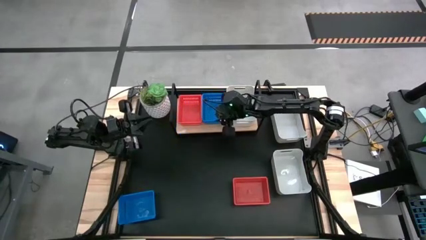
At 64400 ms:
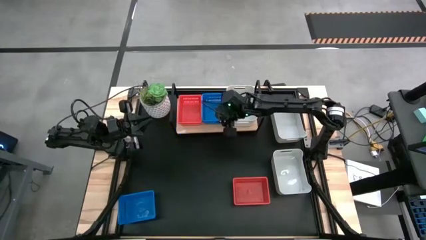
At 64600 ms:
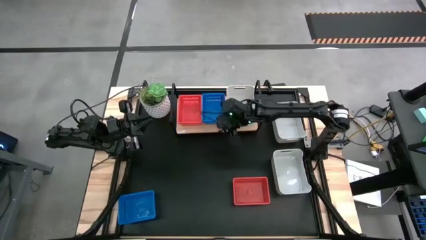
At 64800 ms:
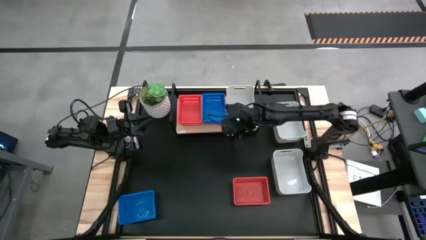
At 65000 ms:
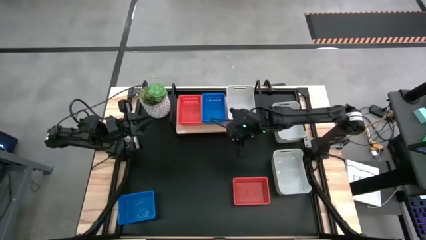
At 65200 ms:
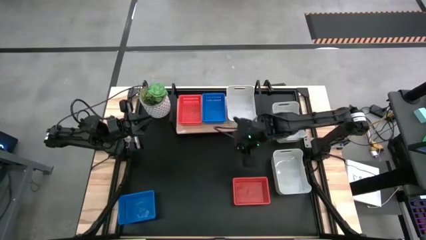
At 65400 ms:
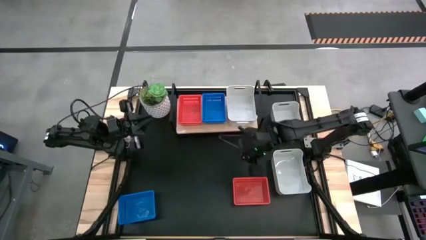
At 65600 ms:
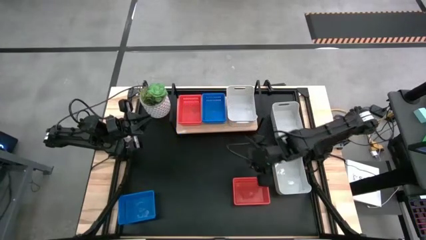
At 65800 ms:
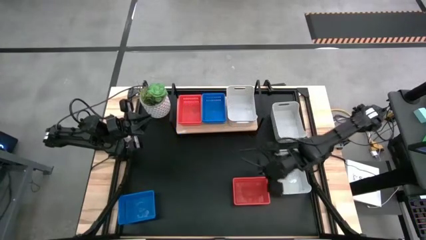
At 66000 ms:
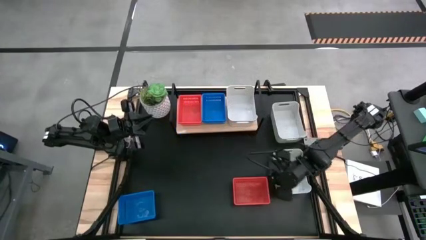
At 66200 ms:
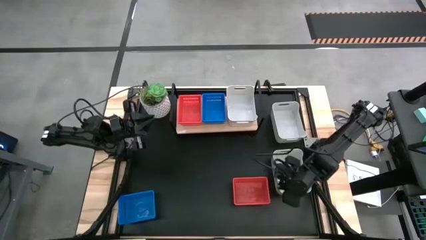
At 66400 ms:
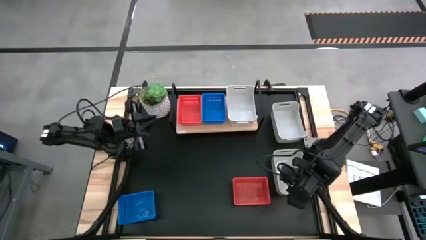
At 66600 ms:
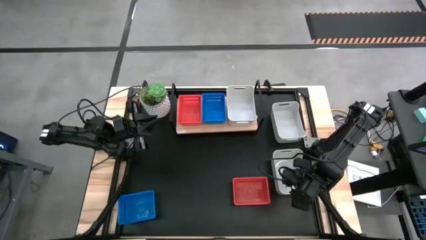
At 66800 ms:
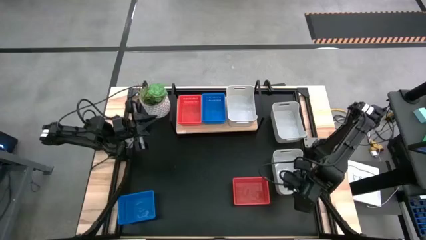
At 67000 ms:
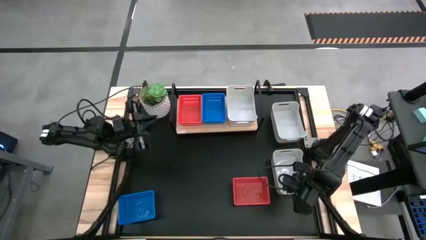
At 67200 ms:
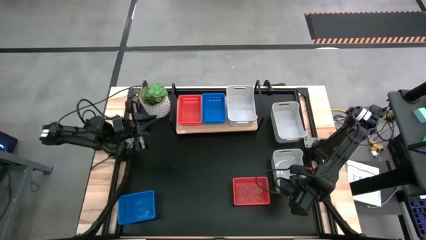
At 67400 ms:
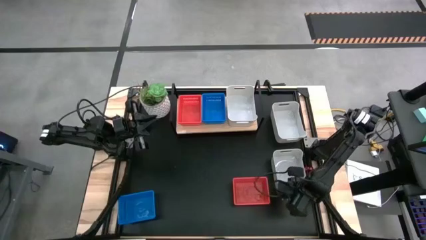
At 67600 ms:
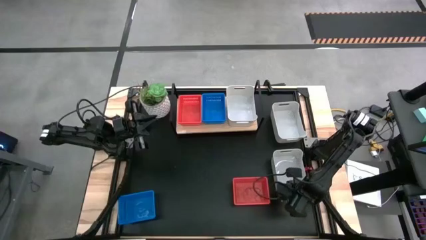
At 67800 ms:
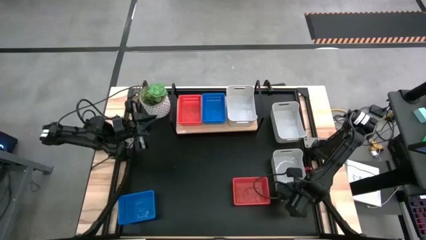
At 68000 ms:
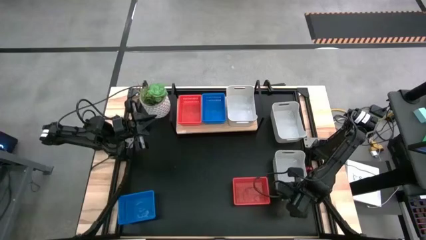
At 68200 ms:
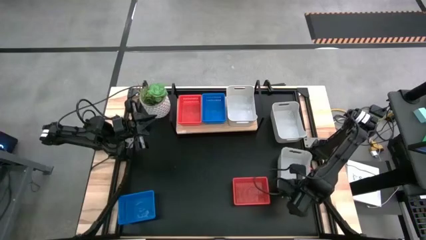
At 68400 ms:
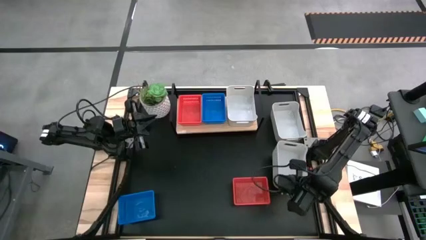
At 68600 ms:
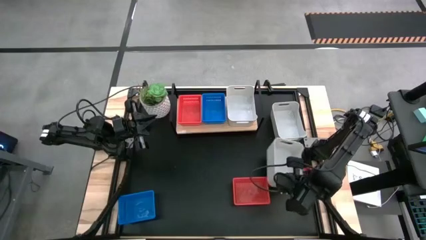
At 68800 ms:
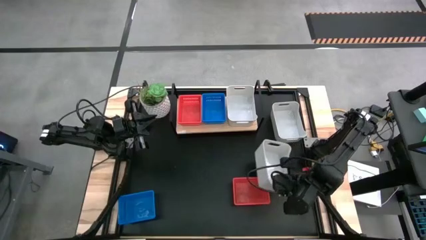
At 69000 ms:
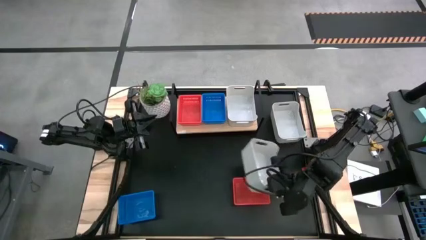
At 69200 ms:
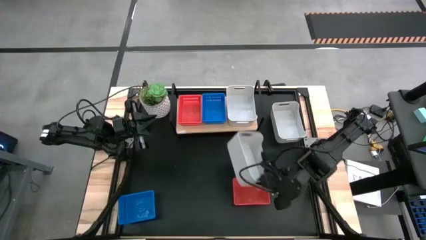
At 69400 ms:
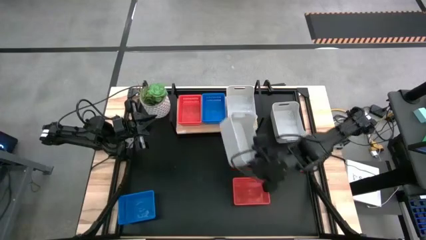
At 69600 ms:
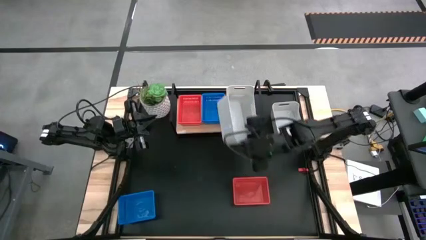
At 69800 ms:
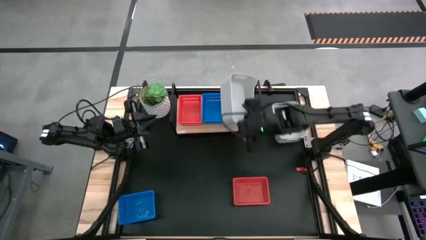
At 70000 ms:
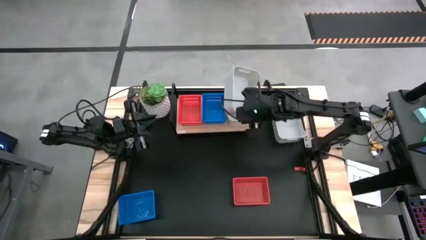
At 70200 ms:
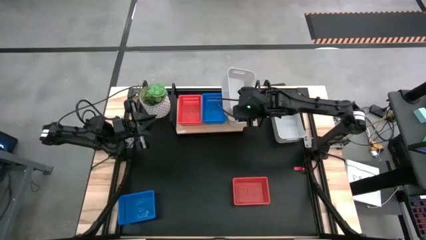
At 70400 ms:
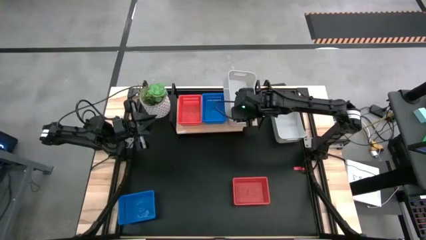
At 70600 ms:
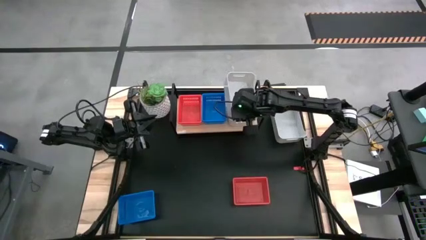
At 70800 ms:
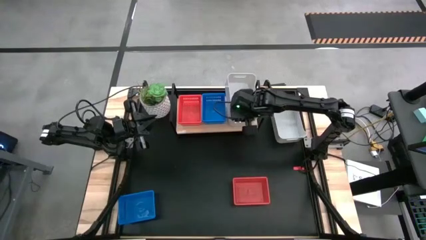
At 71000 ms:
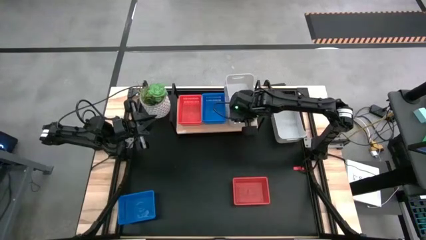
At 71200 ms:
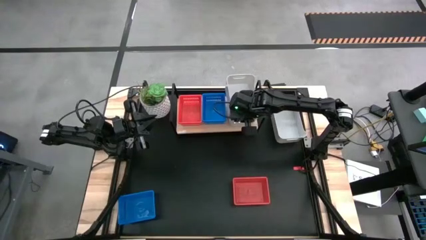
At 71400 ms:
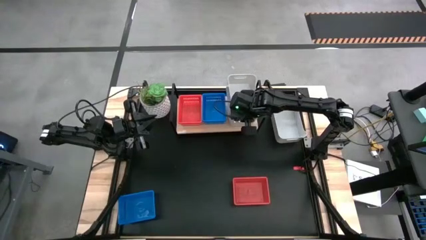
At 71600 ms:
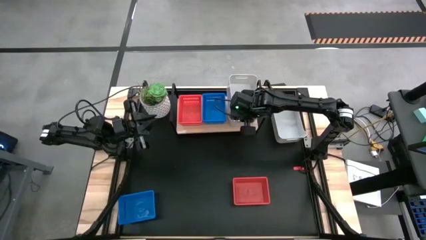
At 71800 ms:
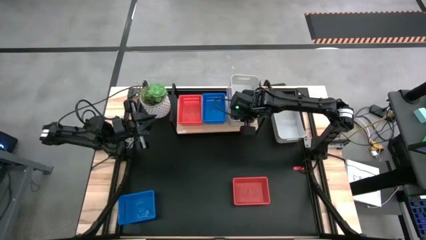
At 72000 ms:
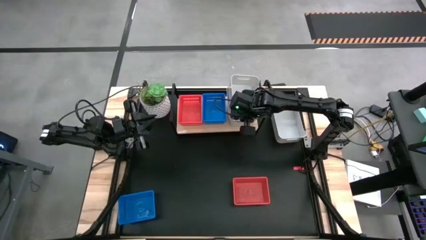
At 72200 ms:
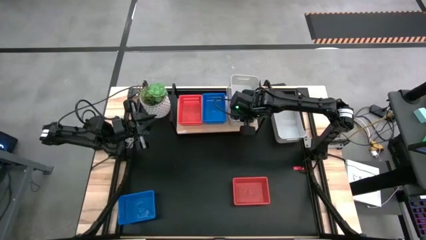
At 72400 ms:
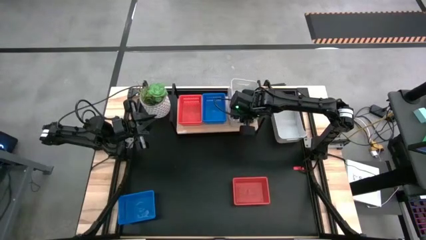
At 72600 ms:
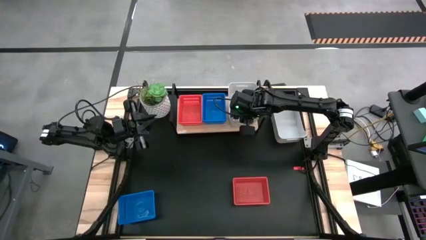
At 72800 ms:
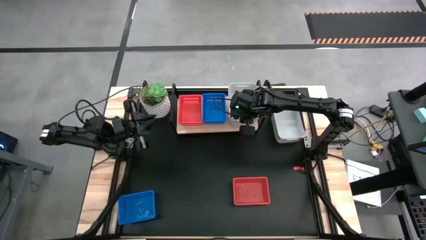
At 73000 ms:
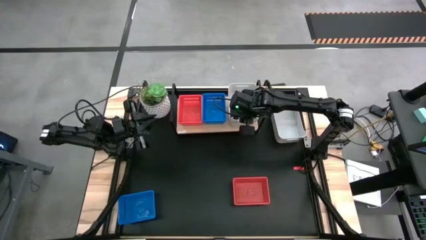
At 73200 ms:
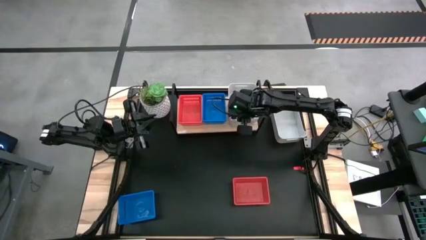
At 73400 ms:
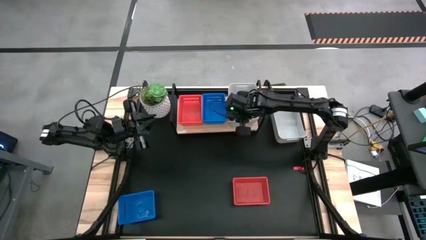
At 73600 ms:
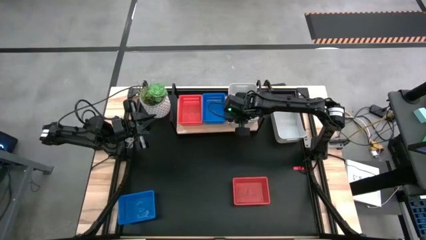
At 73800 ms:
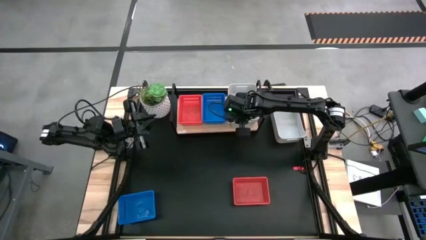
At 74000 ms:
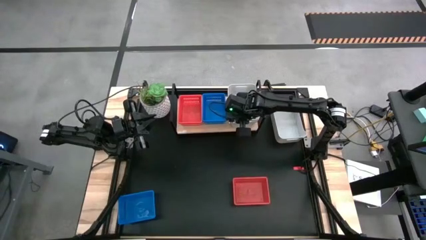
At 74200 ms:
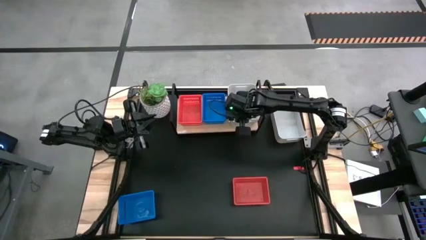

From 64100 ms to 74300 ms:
Stack the bottom white bin on top of the white bin on the shelf
